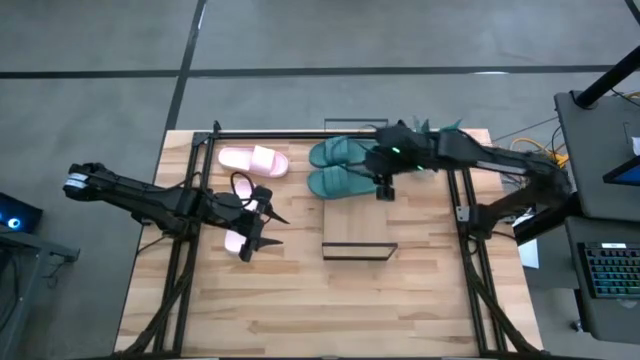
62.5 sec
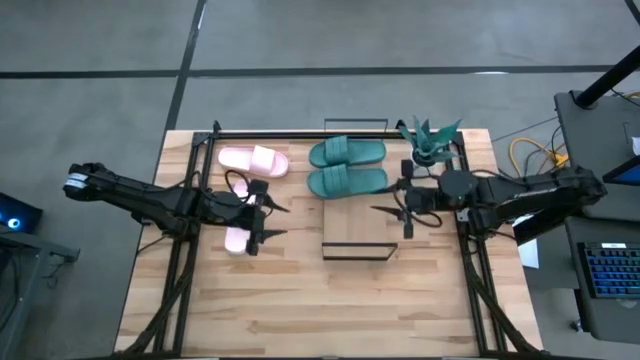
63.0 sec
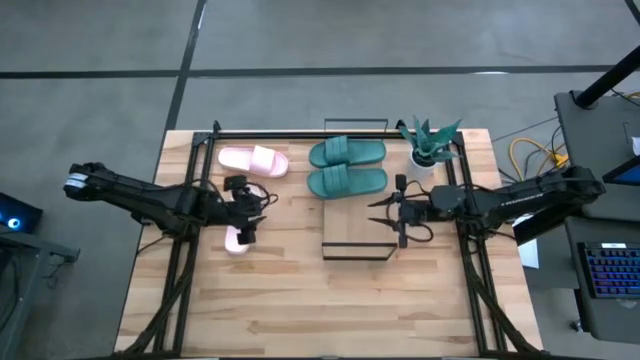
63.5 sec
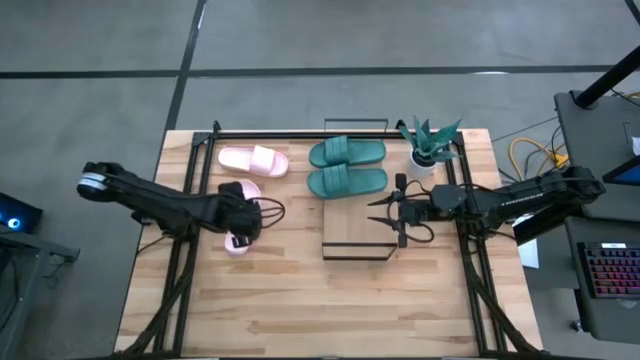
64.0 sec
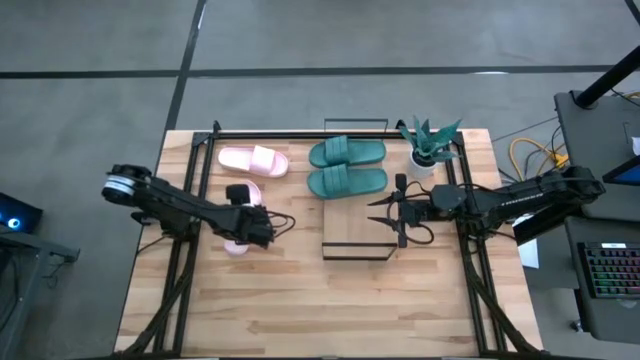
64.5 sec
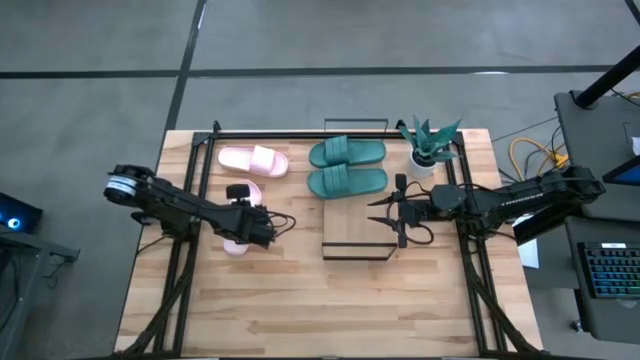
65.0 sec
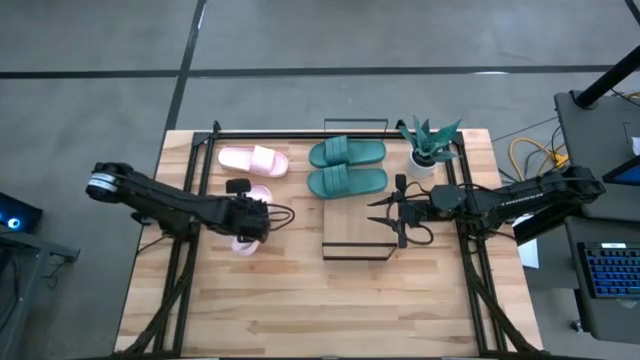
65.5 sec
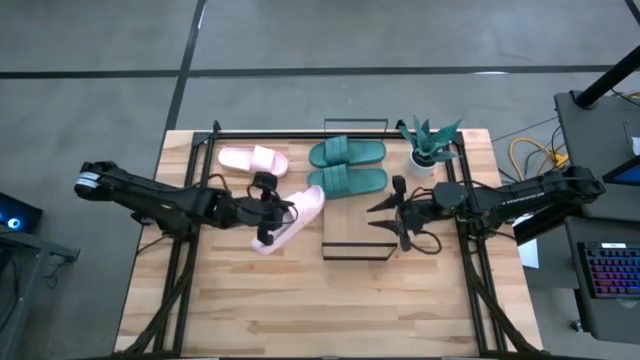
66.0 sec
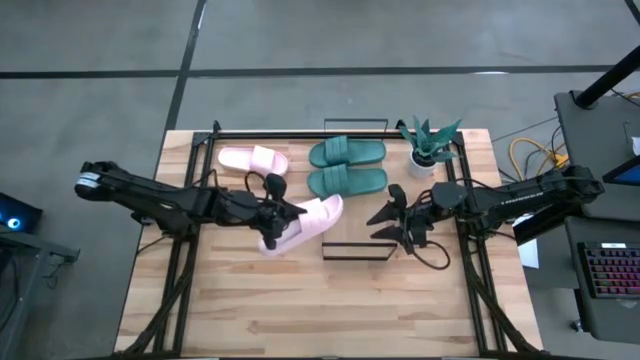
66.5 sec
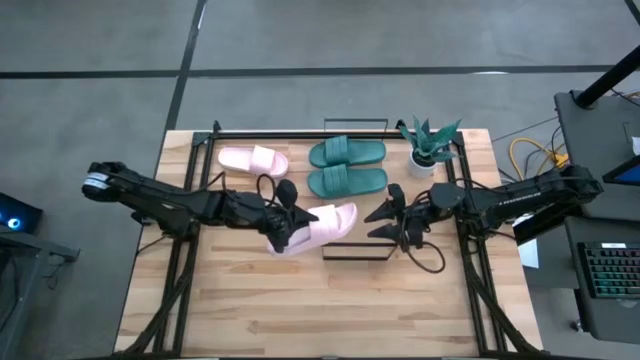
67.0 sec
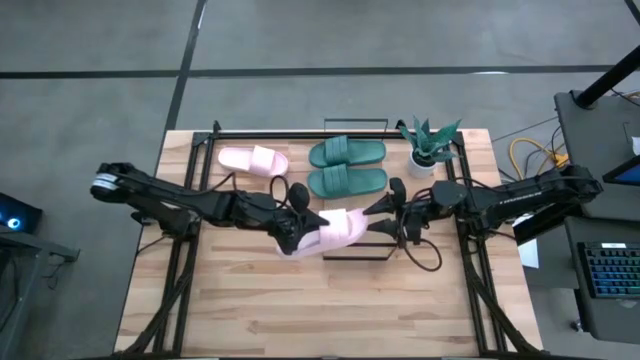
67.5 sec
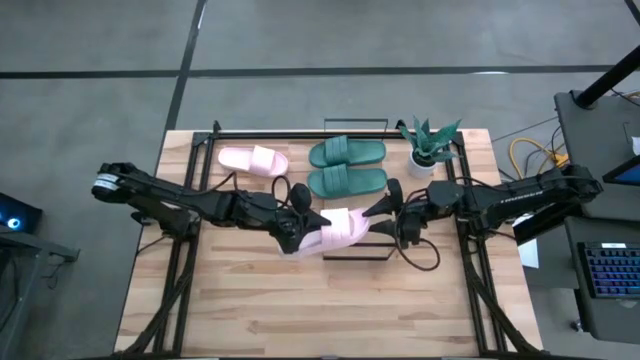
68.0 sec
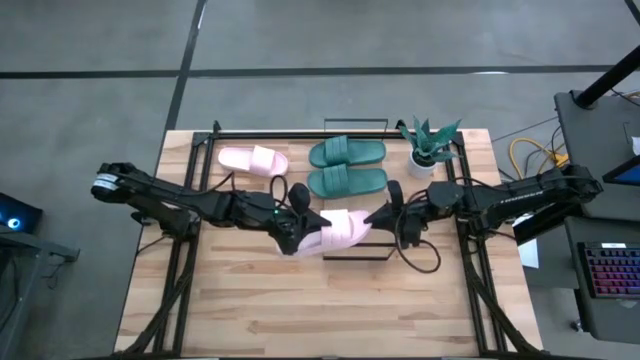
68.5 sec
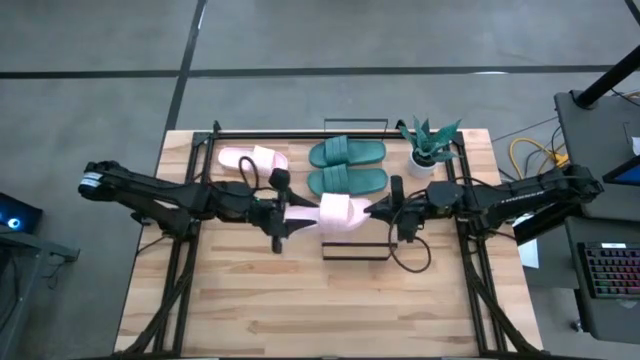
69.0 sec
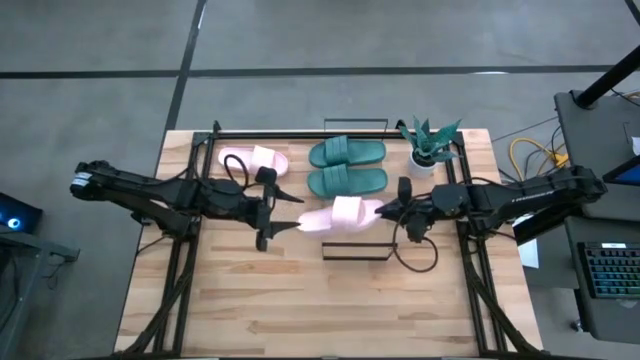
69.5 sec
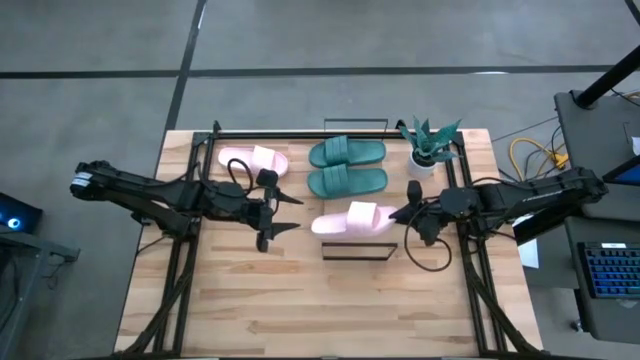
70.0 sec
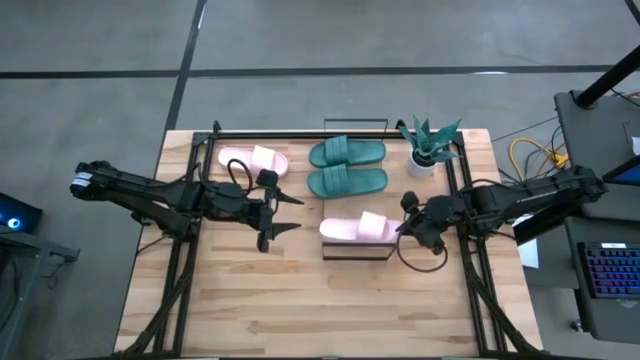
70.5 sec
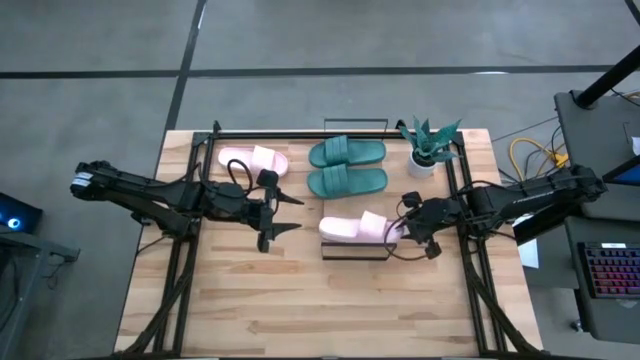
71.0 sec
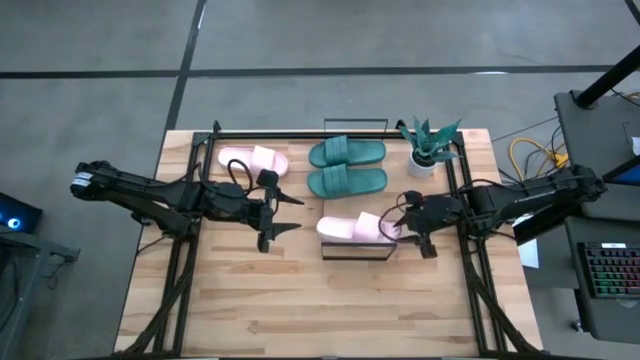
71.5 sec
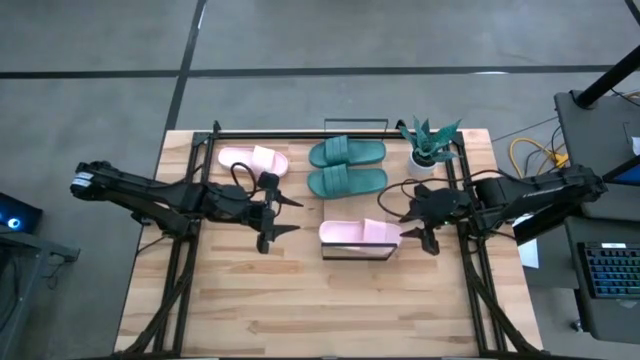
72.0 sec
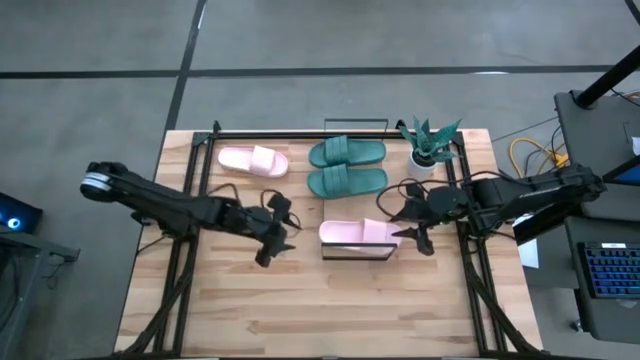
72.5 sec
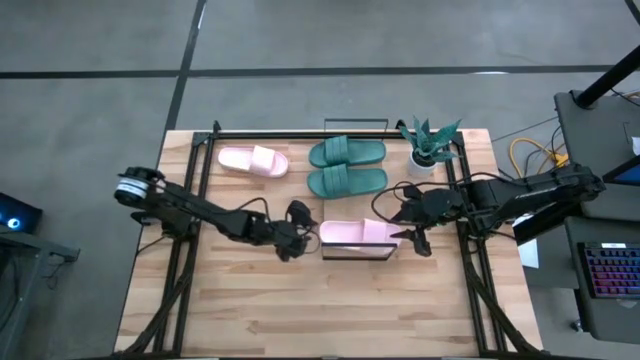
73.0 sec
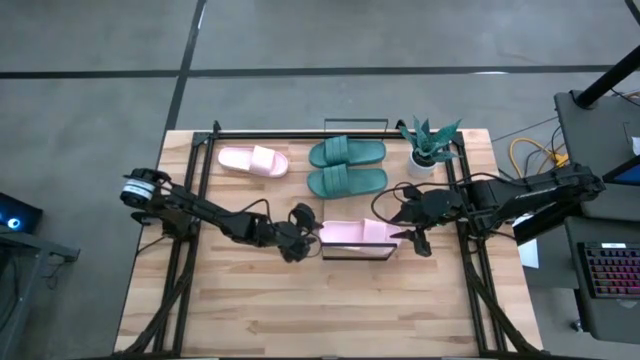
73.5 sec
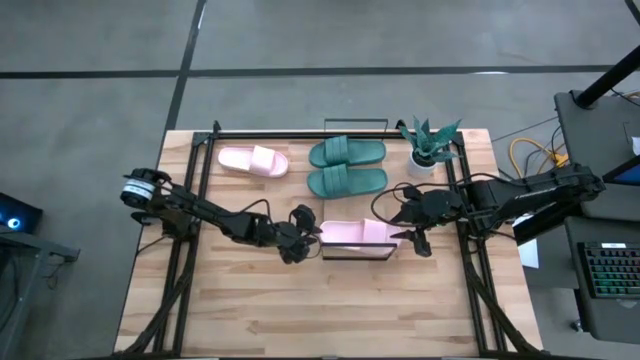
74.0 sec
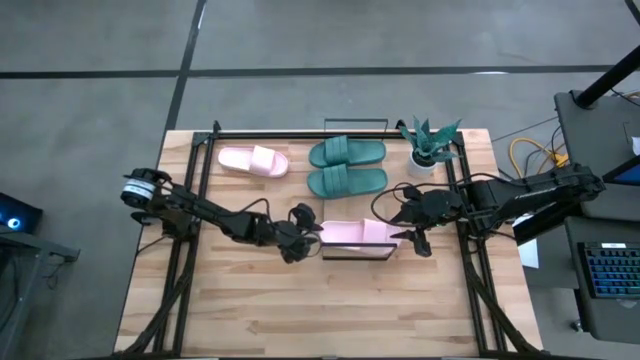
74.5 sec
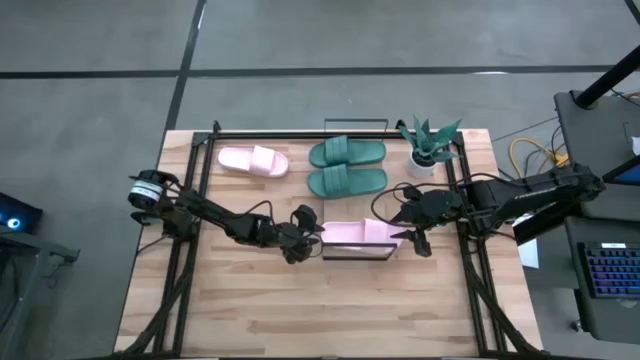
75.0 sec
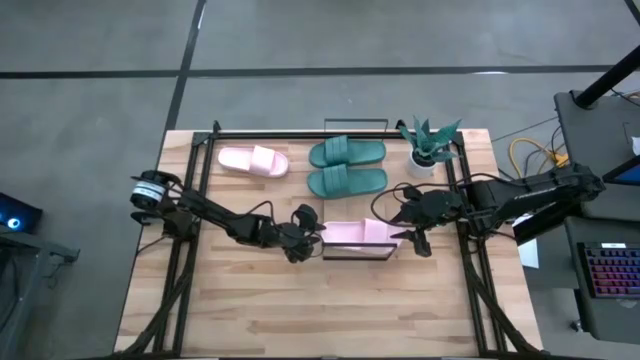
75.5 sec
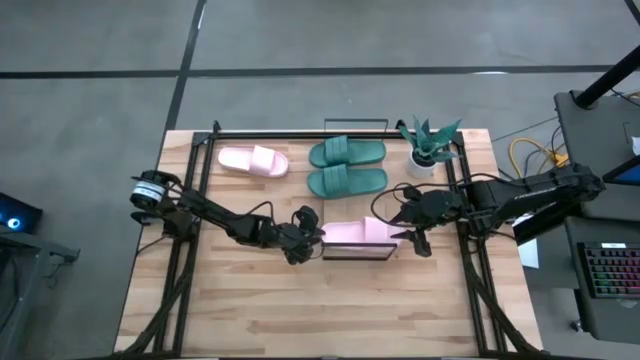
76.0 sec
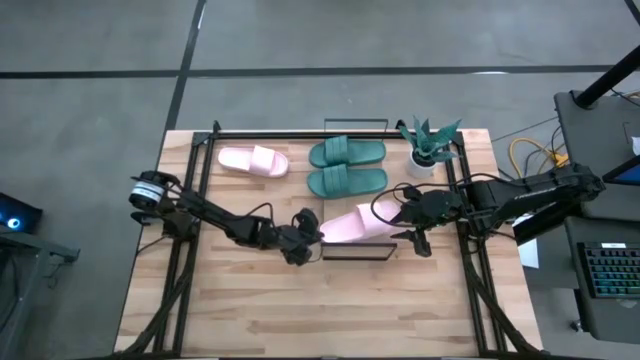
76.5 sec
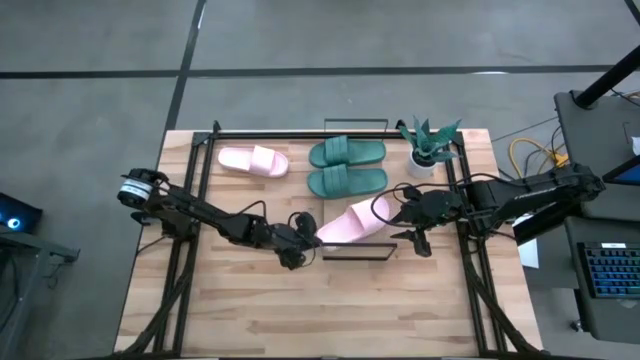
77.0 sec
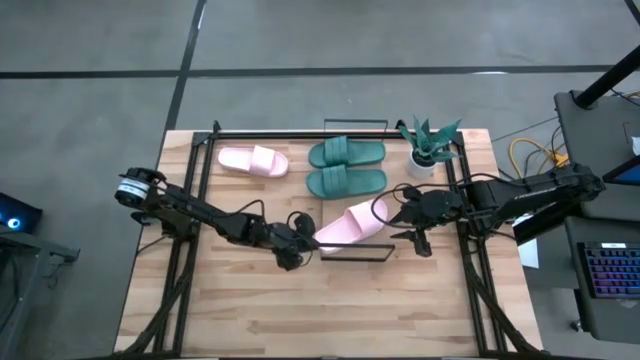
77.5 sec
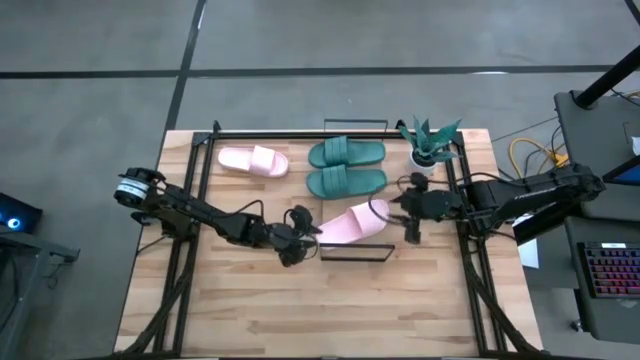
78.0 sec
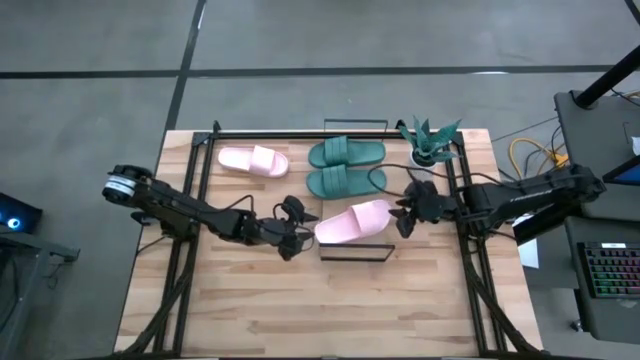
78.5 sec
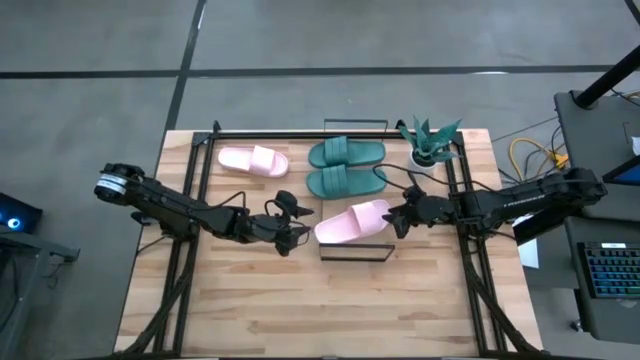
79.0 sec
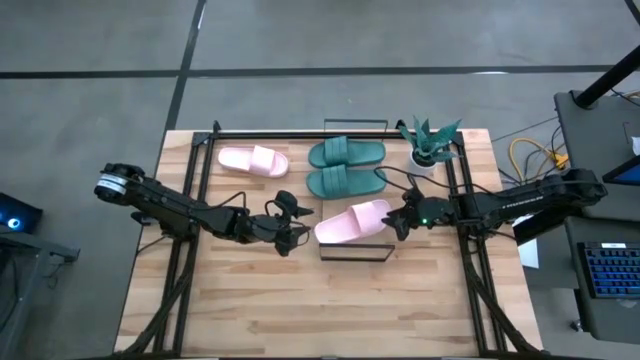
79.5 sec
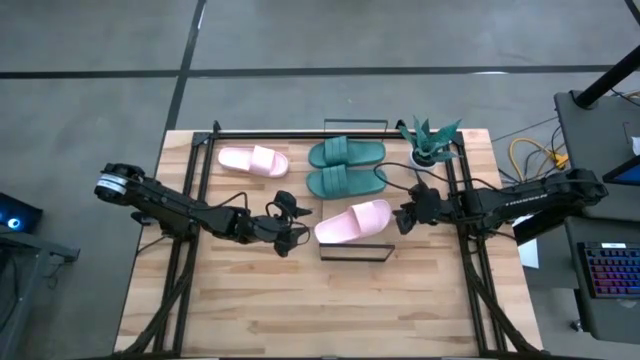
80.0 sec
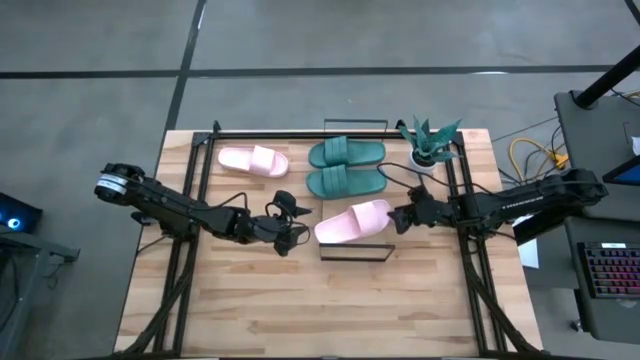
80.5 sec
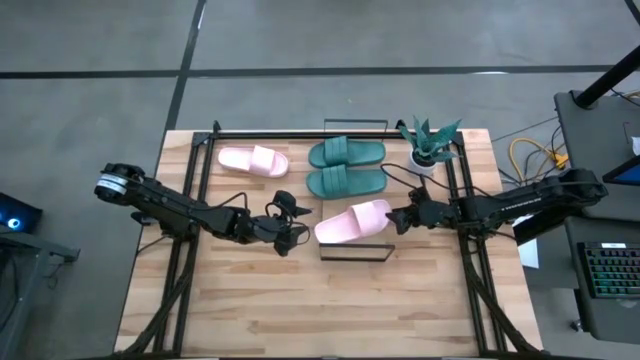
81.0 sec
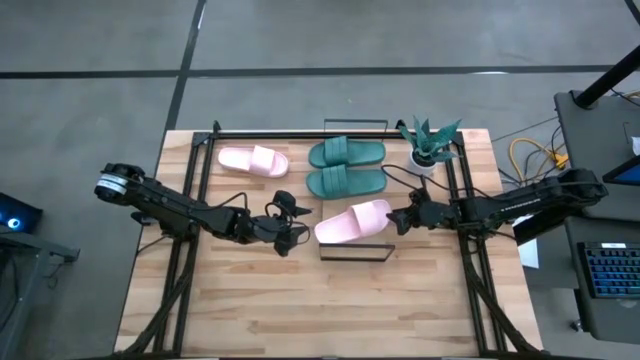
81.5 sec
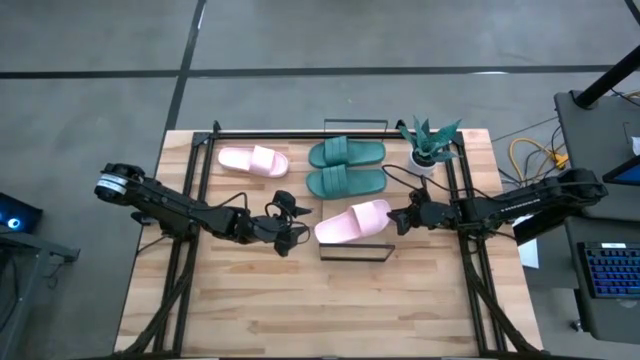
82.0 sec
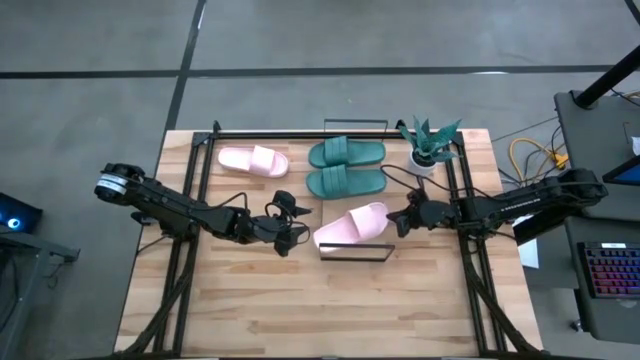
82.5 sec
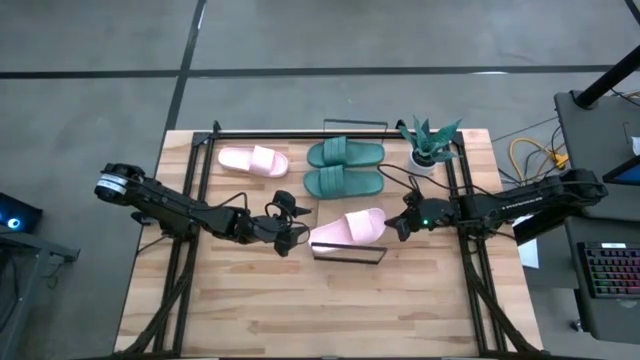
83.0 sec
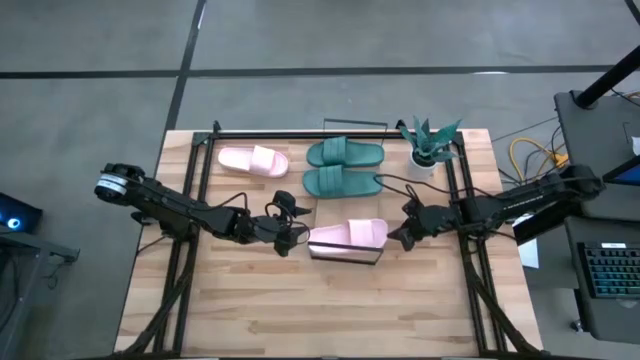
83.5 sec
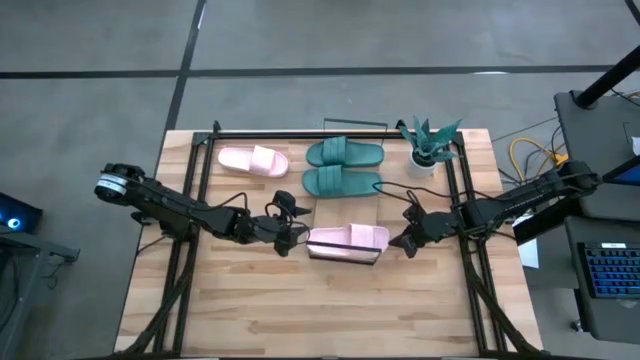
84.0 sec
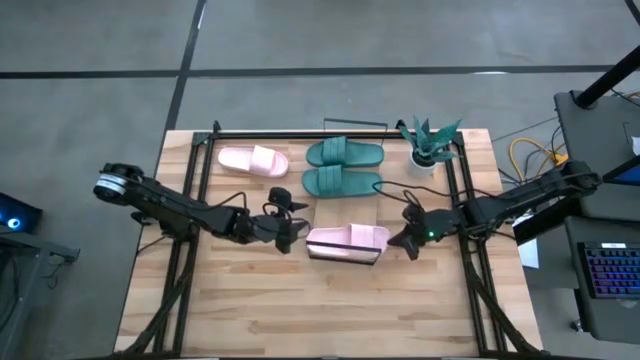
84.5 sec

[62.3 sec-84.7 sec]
Task: Pick and place slides into the shelf
Put the bottom pink slipper on the shelf
